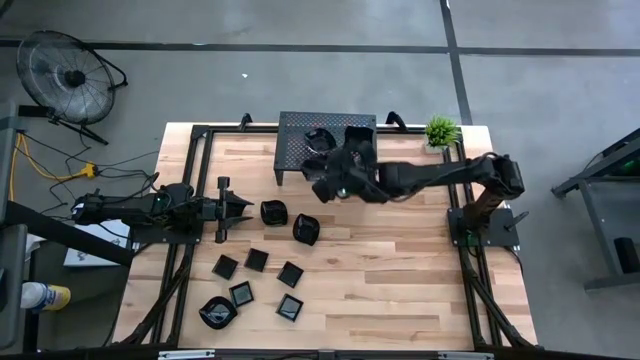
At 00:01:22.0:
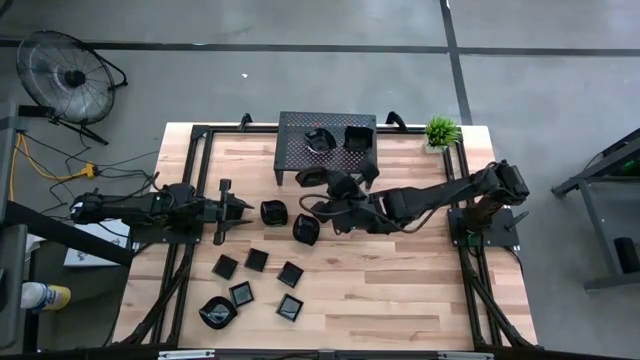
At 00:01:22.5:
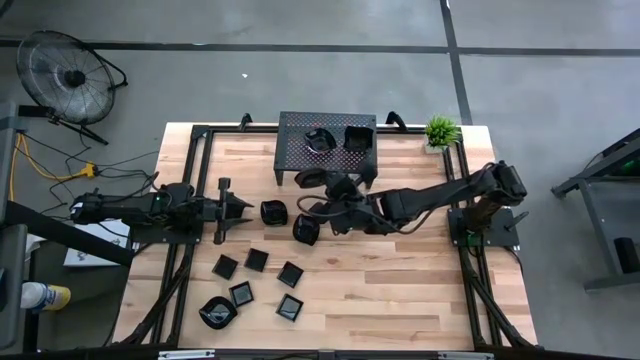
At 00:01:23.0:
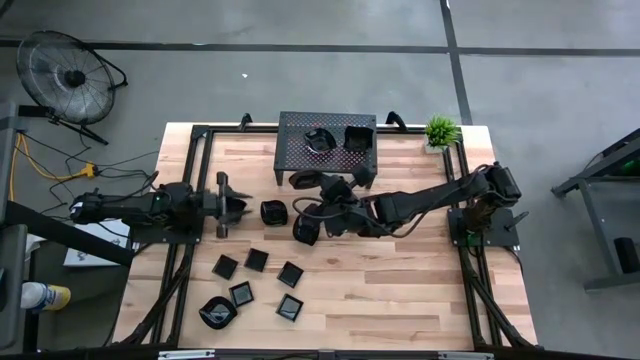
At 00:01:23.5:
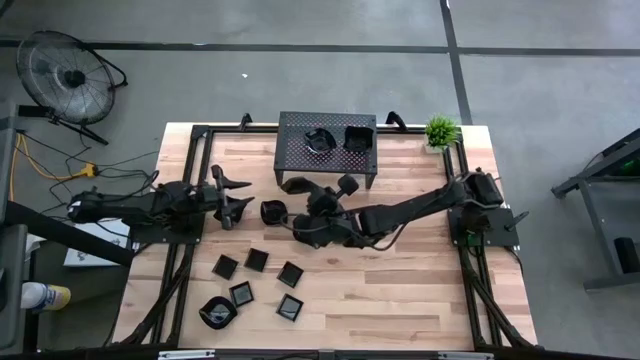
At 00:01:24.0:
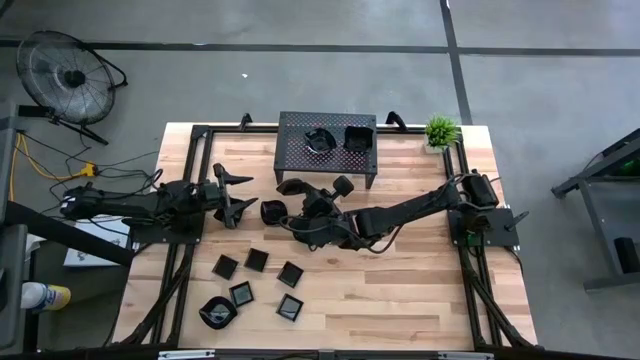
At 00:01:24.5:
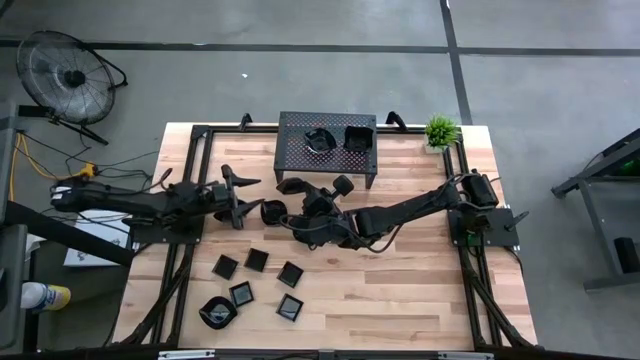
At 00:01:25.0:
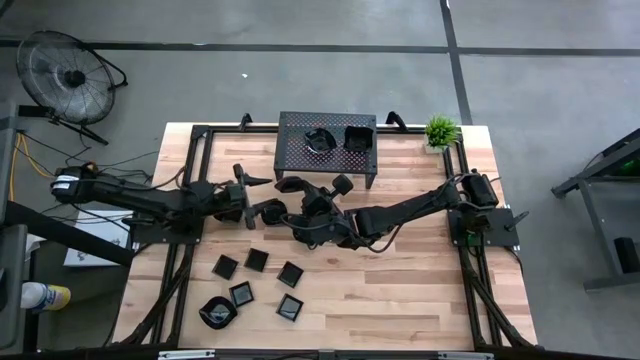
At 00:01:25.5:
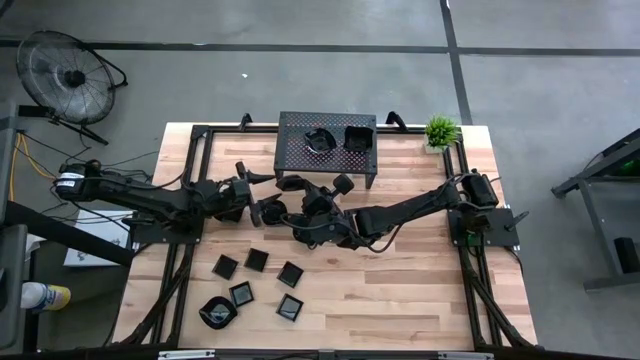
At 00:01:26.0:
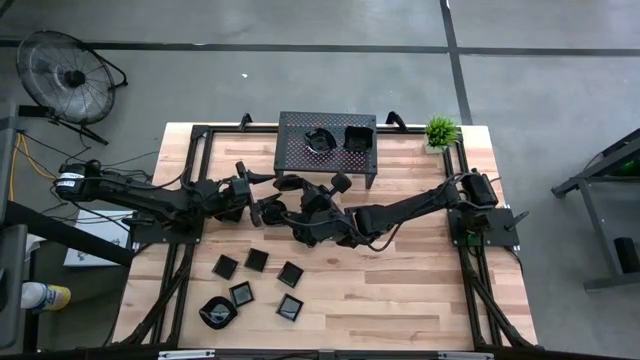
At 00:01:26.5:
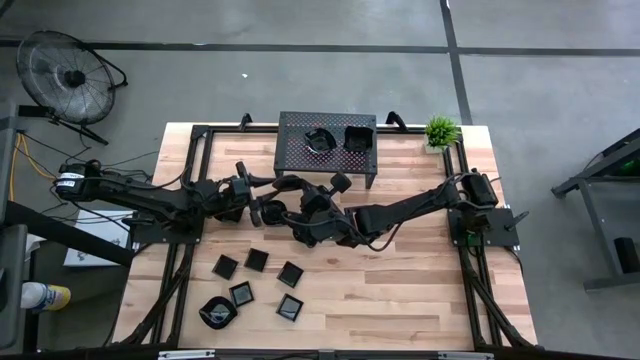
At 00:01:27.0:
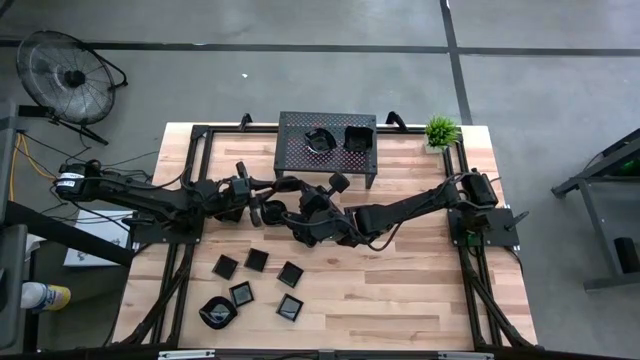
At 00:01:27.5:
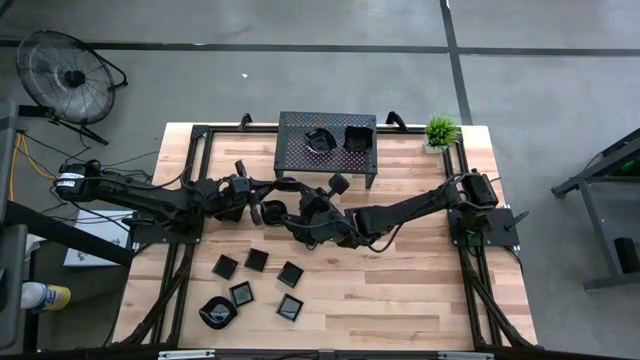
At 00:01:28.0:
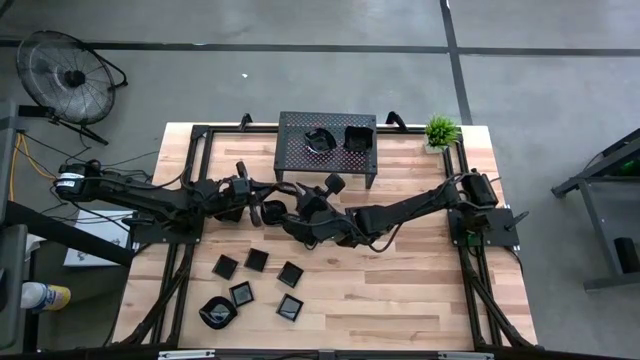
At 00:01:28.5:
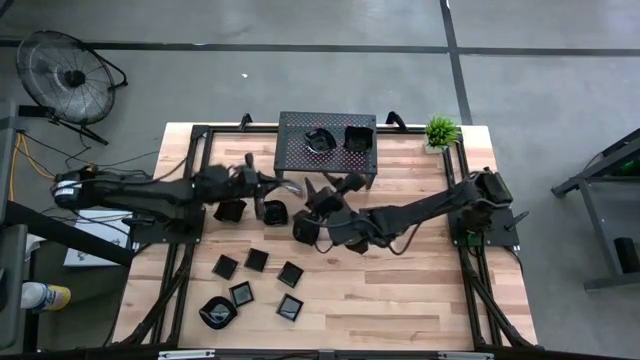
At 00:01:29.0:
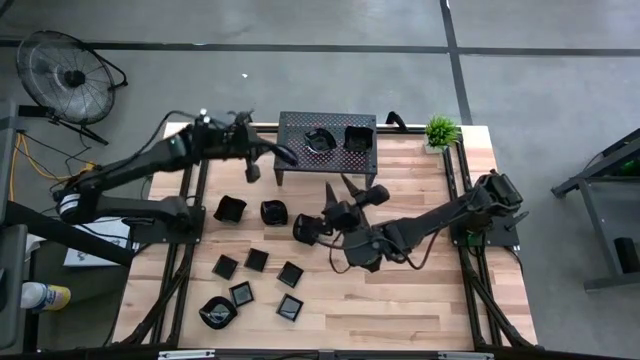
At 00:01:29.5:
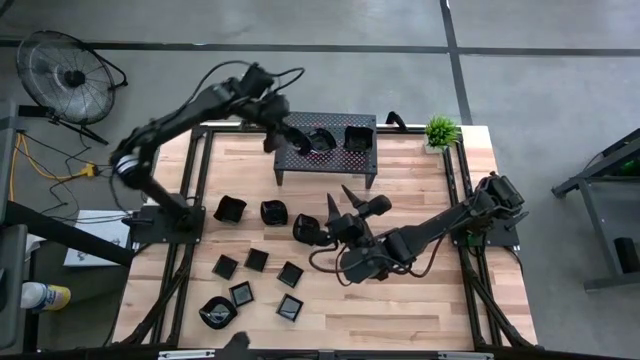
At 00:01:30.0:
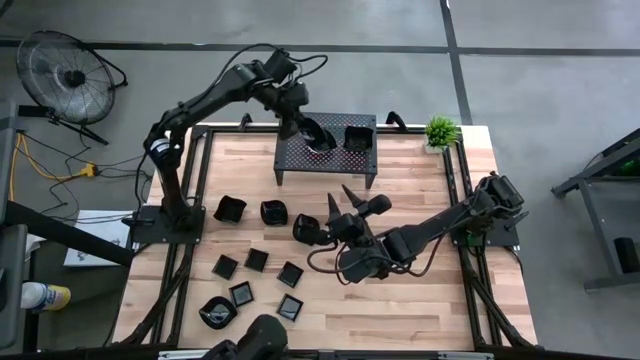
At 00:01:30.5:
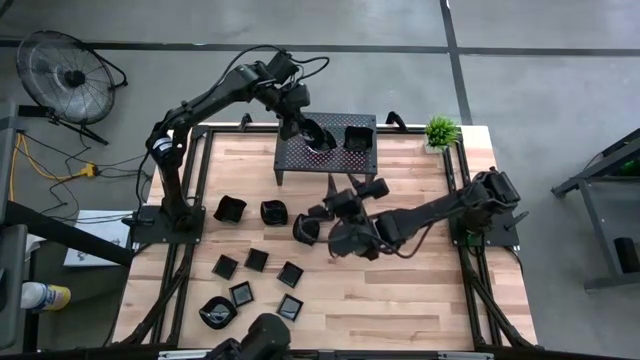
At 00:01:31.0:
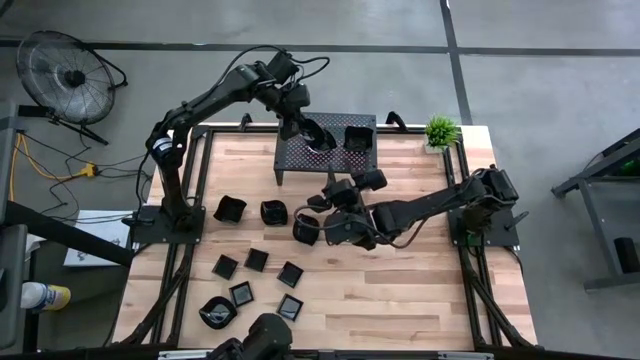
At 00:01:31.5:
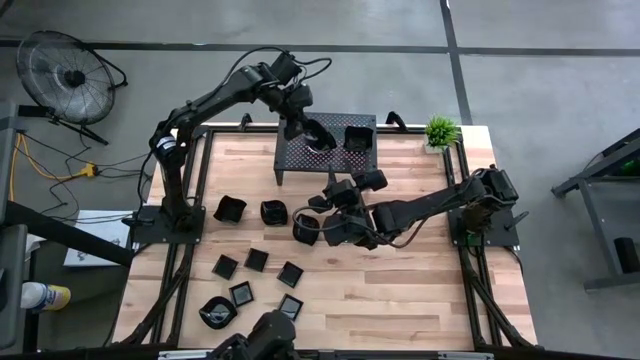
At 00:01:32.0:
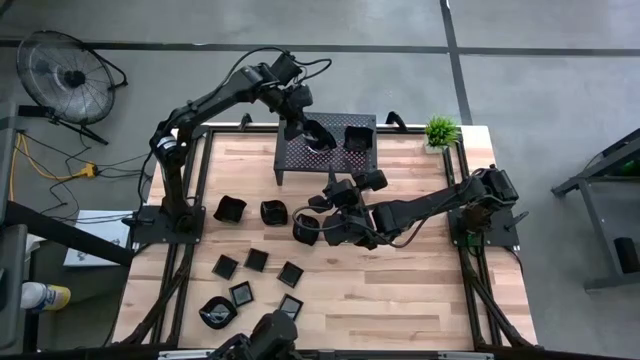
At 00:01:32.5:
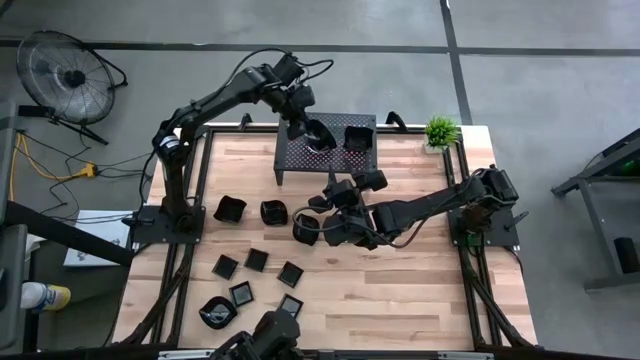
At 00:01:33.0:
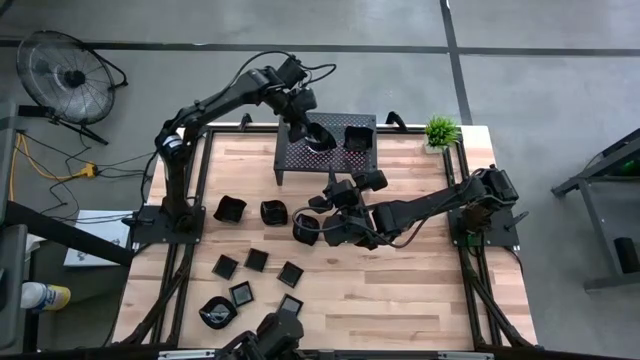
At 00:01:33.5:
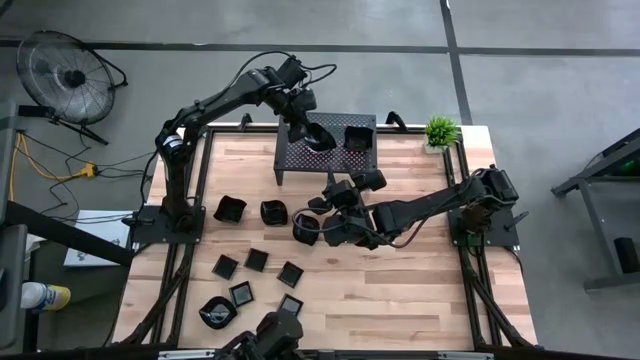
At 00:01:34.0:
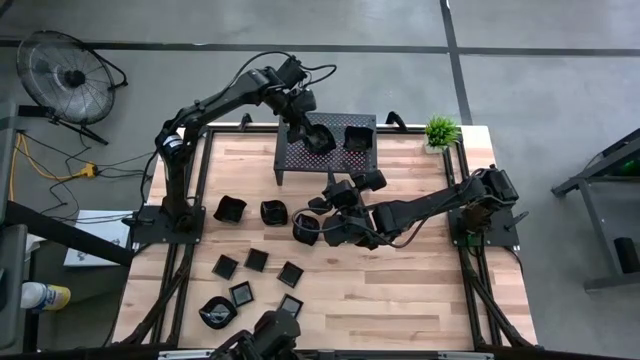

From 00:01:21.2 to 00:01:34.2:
Task: Pick & Place Mini shaped plates
Stack the black leaf shaped plate on top of the black leaf shaped plate on the shelf

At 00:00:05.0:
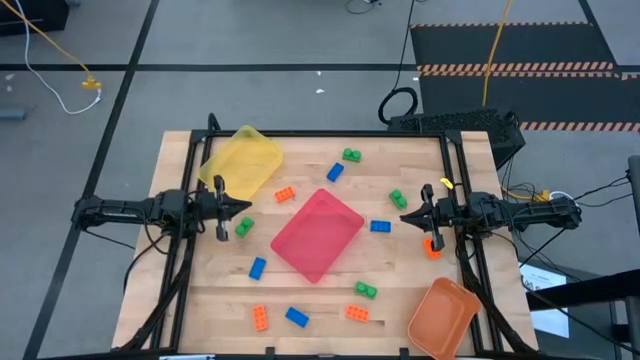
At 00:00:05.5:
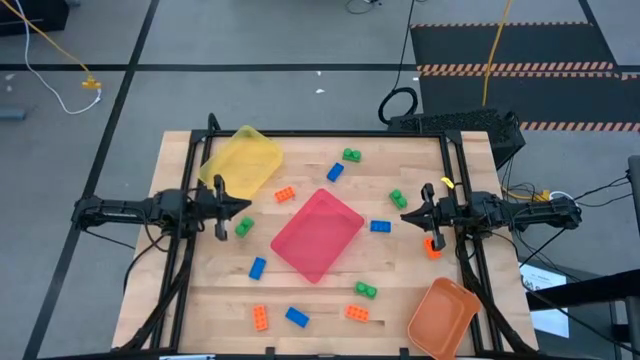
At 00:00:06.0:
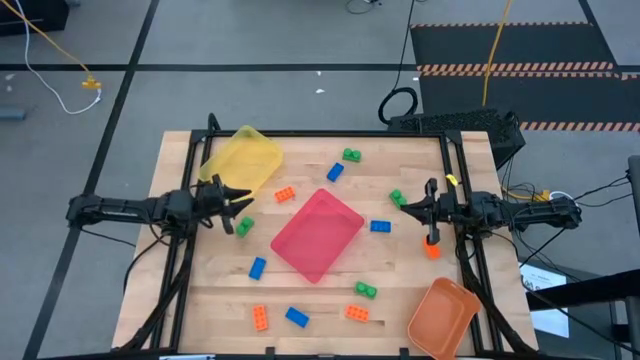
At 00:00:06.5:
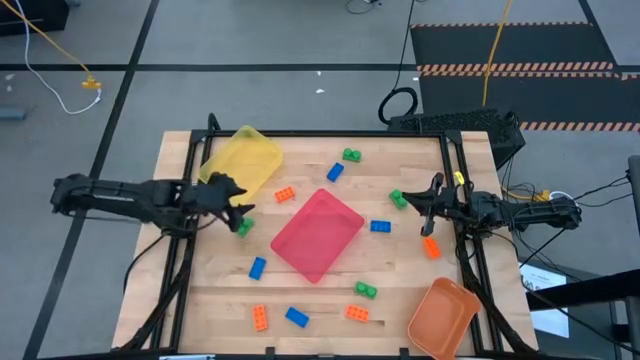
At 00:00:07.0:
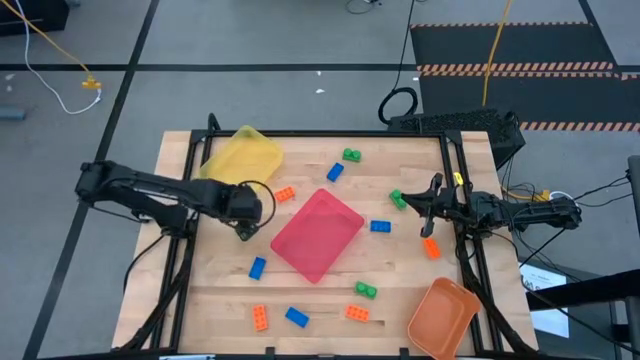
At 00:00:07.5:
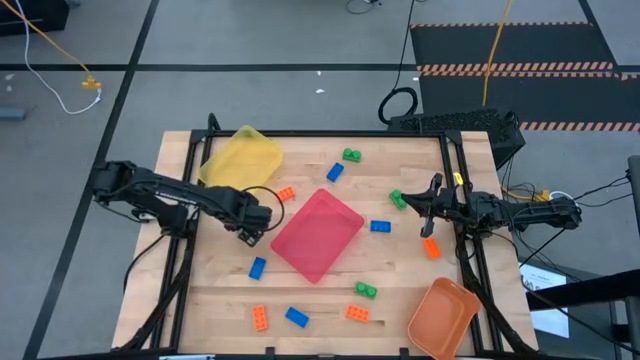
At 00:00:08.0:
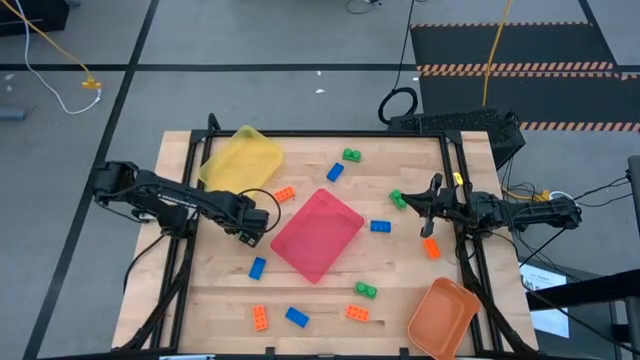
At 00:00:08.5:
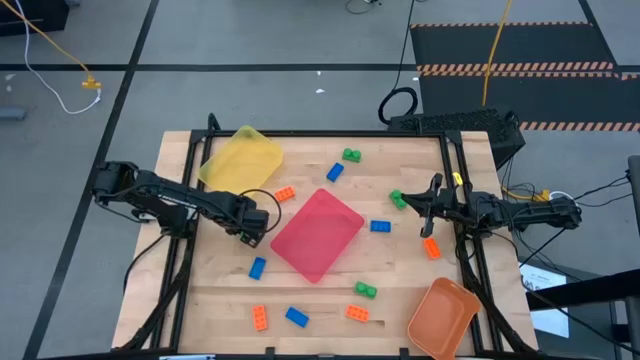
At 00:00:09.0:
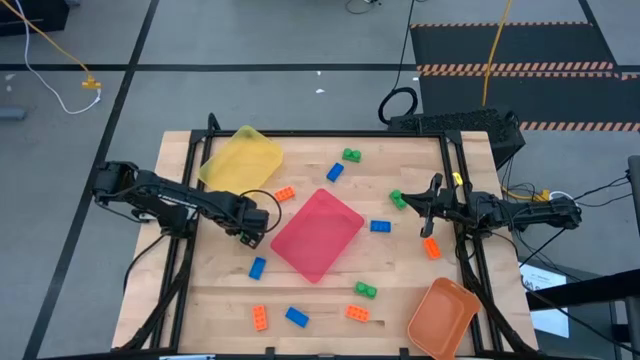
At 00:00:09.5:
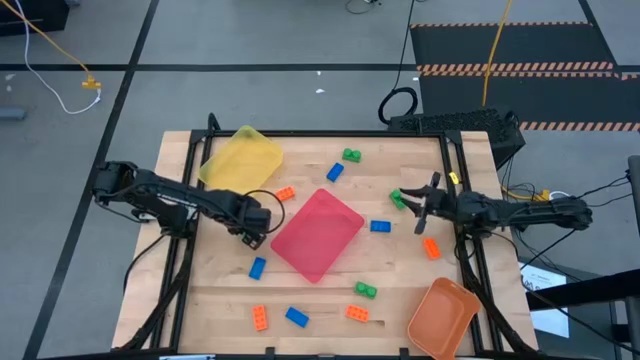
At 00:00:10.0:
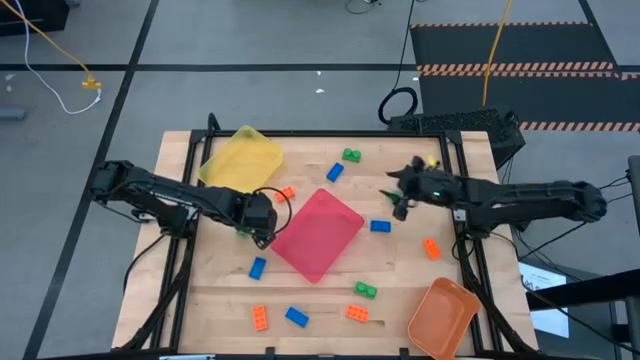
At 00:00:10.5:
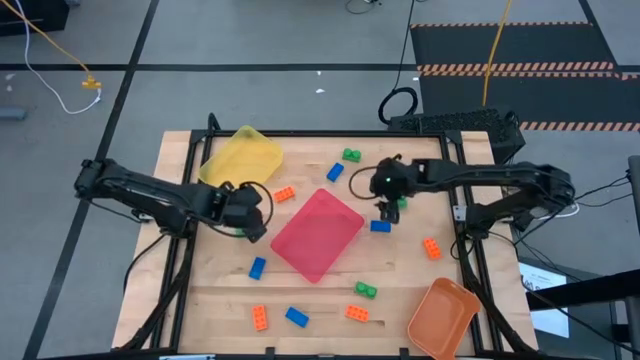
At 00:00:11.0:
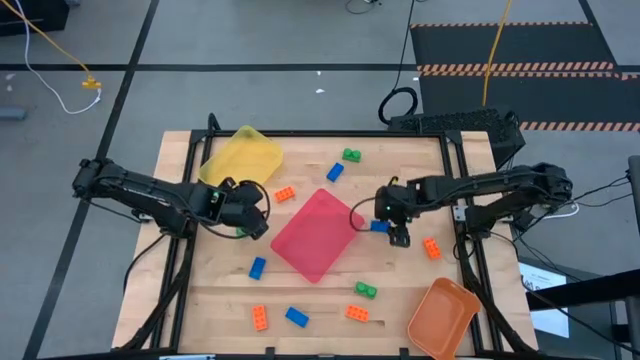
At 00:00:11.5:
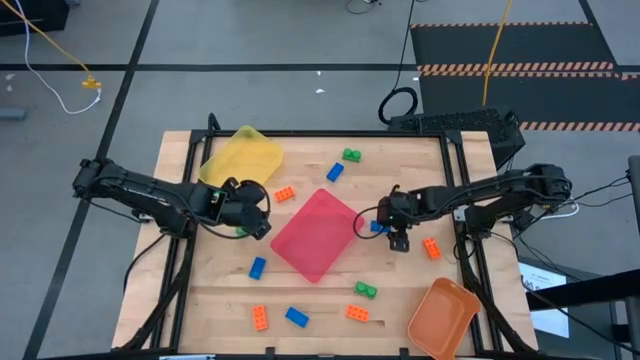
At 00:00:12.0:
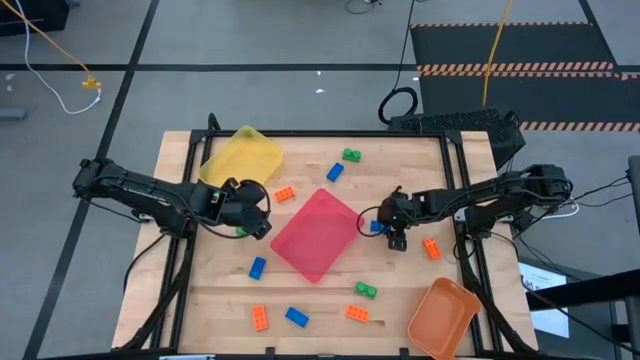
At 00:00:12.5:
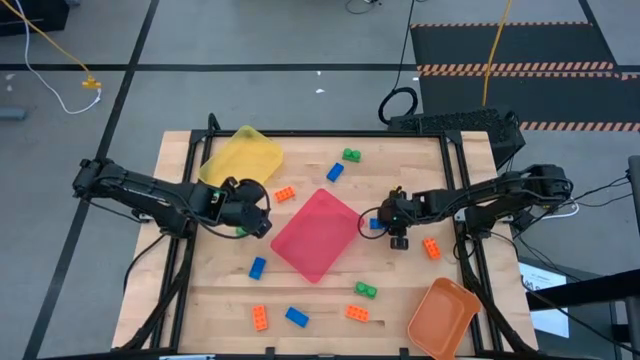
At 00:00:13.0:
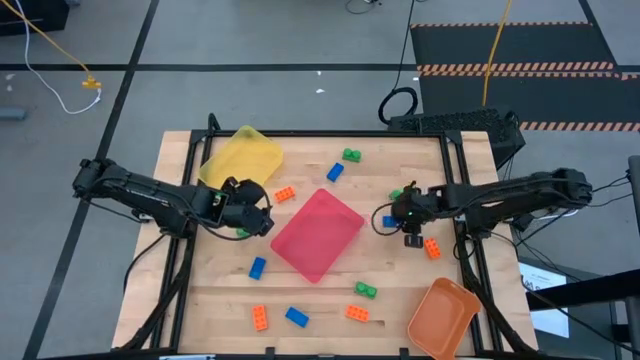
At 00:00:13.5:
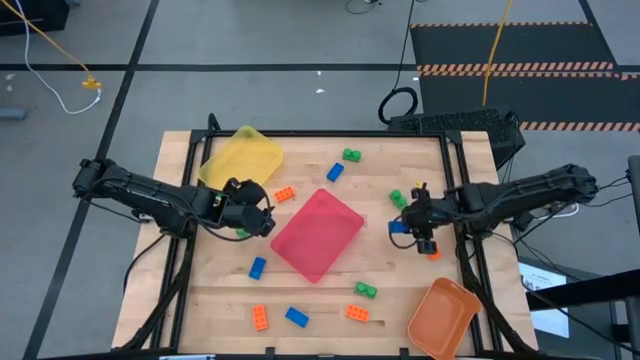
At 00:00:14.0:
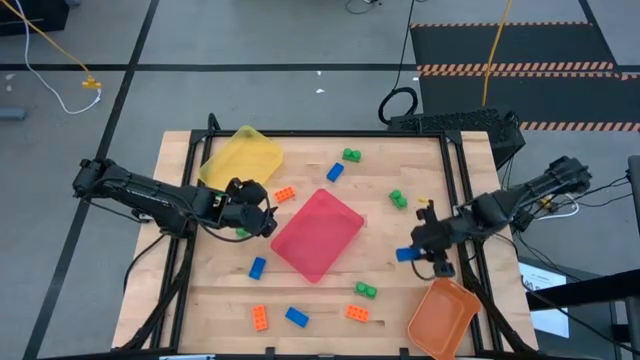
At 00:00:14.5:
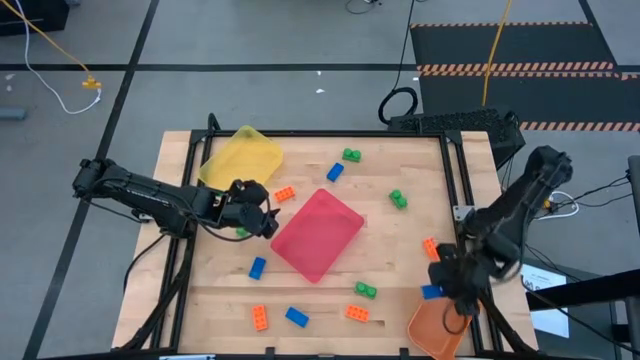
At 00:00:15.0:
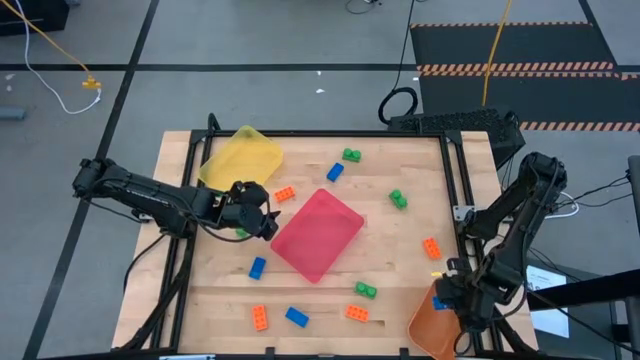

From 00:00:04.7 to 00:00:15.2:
Task: Sort & place blocks by color
Put the blue game piece into the orange bin
